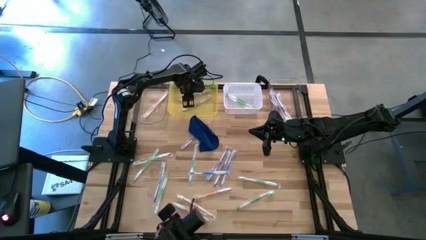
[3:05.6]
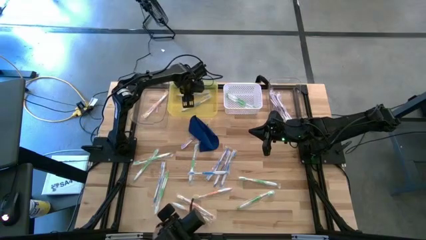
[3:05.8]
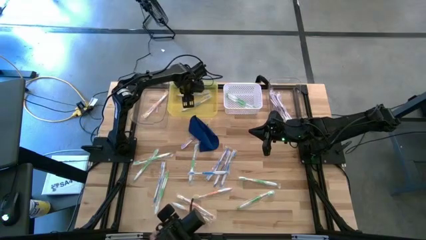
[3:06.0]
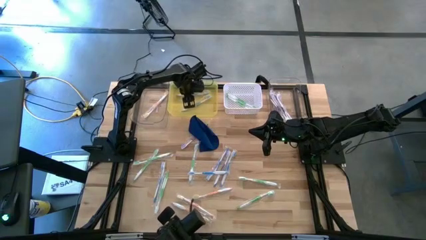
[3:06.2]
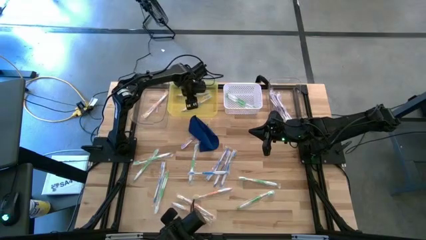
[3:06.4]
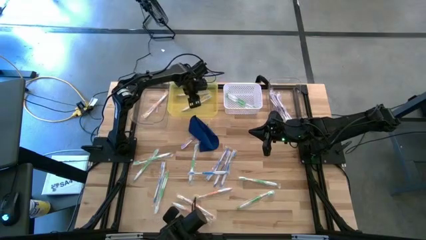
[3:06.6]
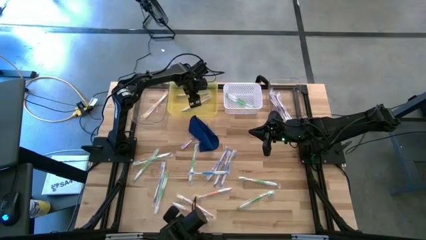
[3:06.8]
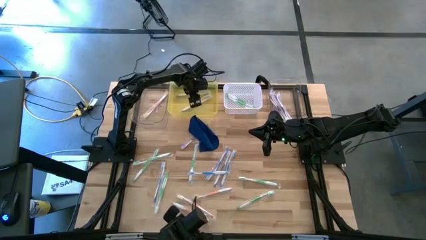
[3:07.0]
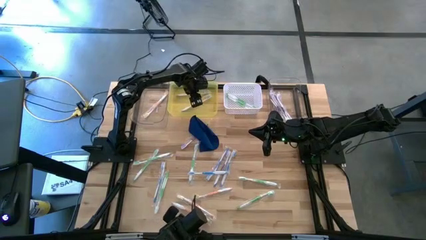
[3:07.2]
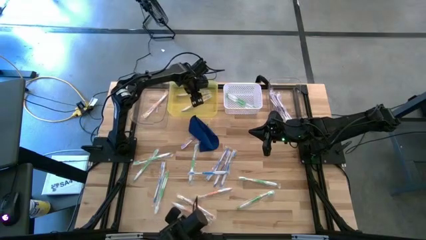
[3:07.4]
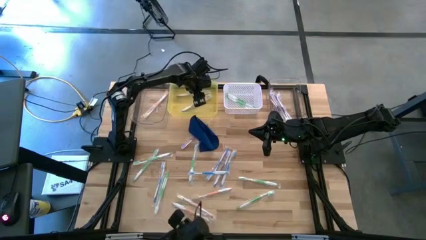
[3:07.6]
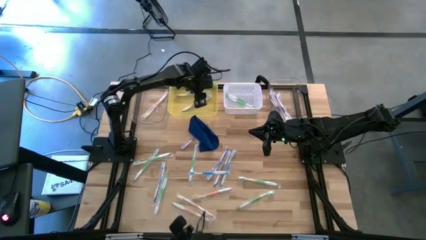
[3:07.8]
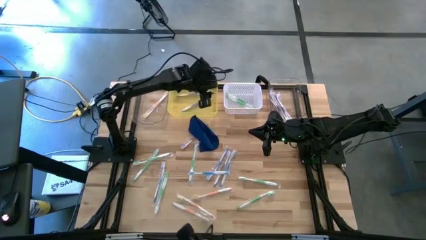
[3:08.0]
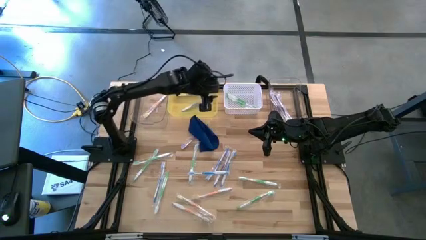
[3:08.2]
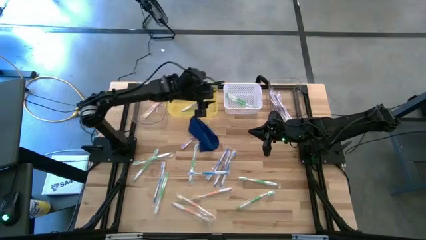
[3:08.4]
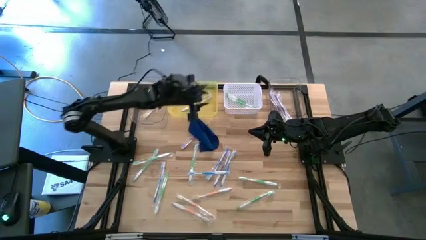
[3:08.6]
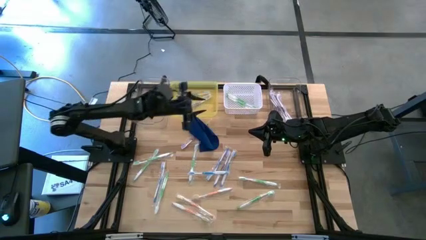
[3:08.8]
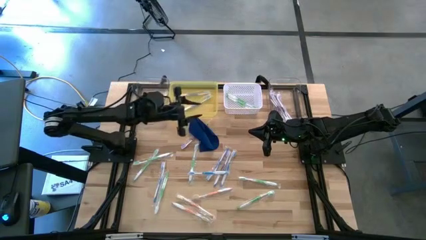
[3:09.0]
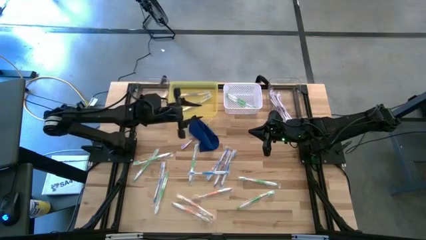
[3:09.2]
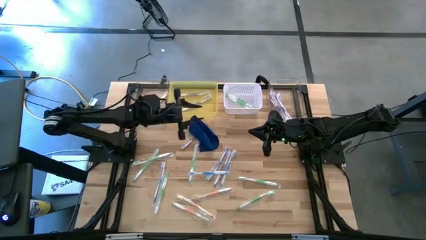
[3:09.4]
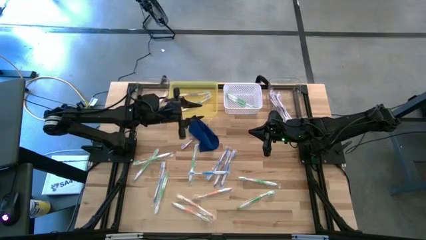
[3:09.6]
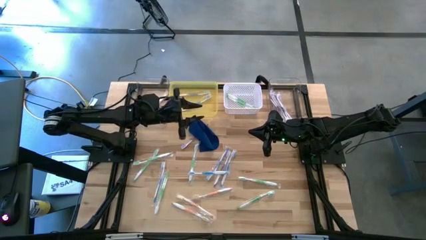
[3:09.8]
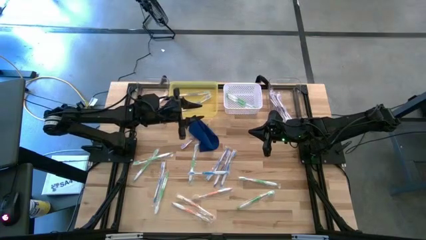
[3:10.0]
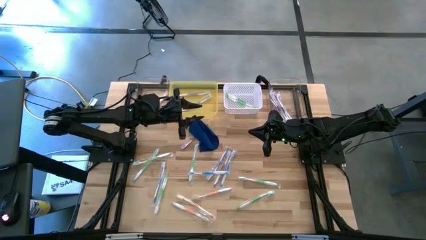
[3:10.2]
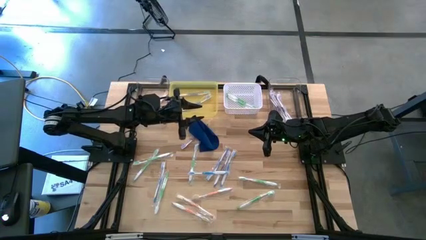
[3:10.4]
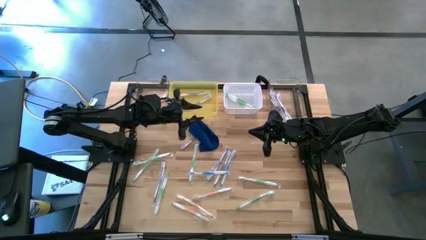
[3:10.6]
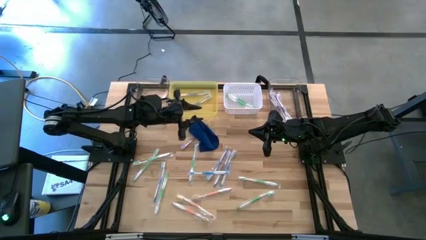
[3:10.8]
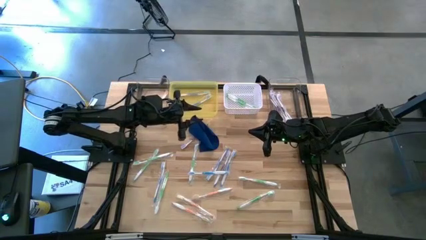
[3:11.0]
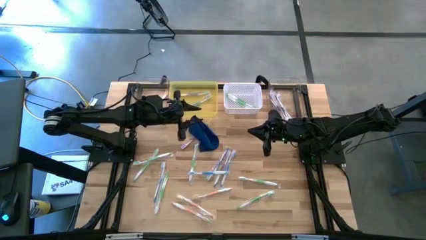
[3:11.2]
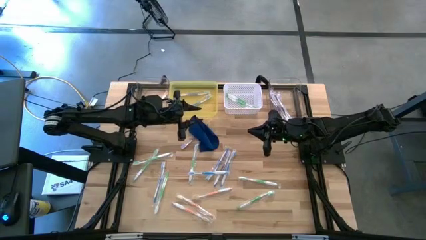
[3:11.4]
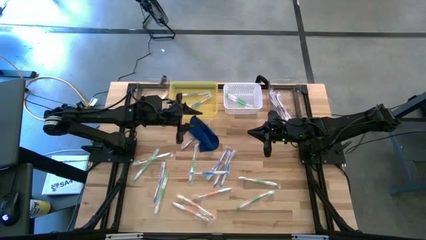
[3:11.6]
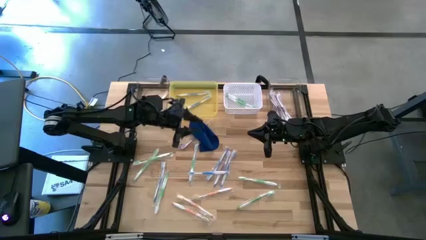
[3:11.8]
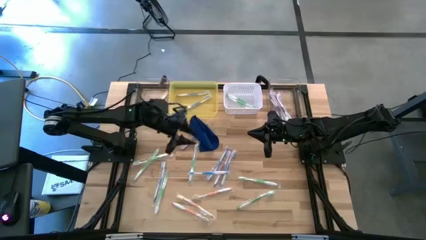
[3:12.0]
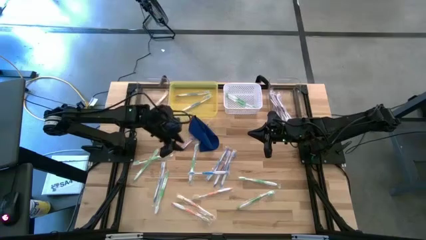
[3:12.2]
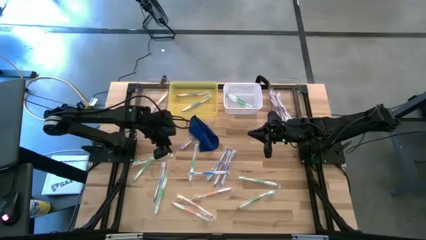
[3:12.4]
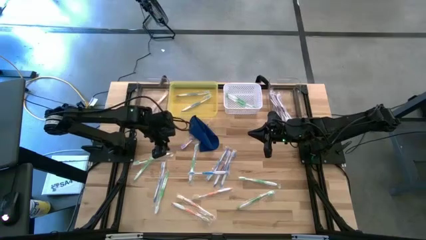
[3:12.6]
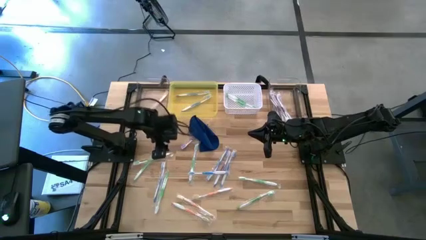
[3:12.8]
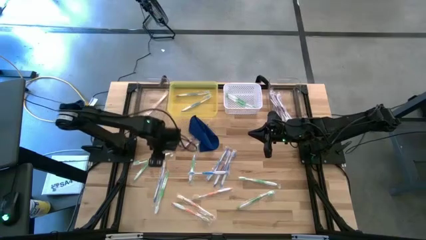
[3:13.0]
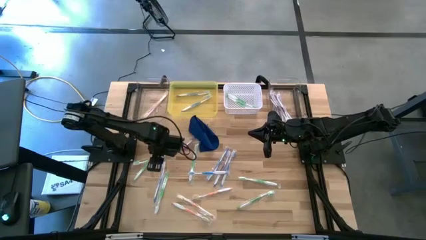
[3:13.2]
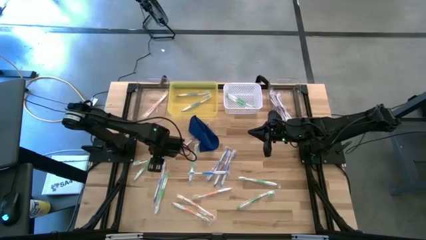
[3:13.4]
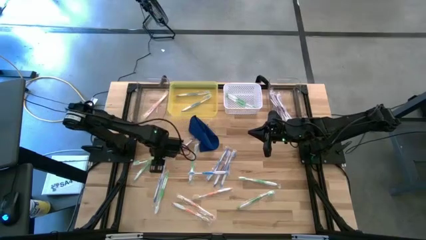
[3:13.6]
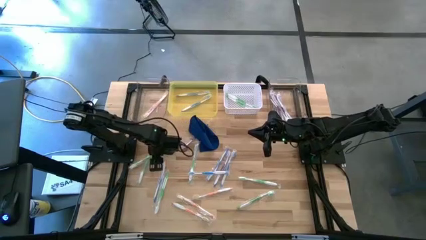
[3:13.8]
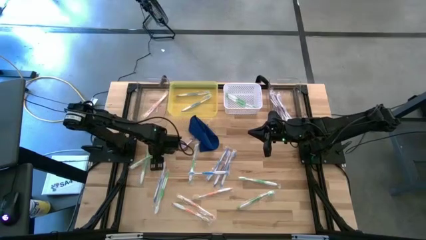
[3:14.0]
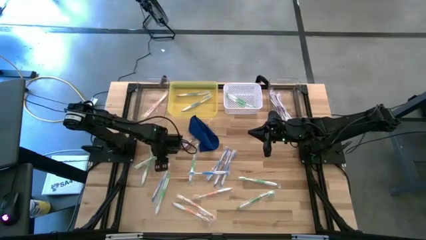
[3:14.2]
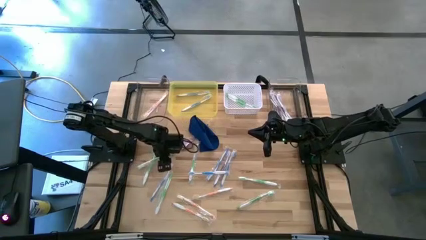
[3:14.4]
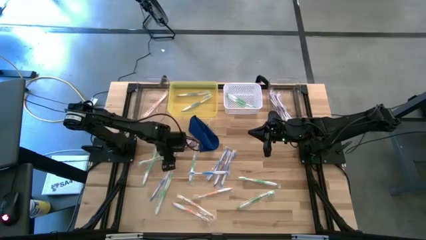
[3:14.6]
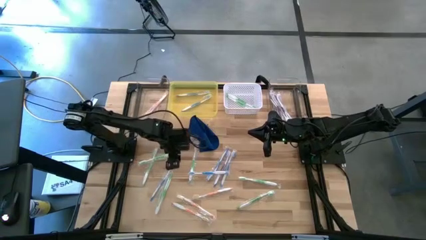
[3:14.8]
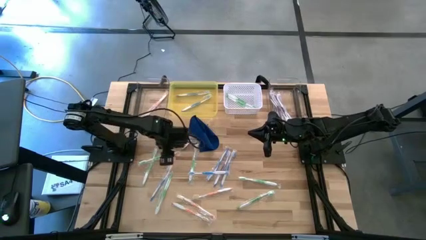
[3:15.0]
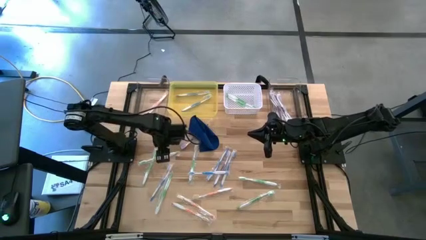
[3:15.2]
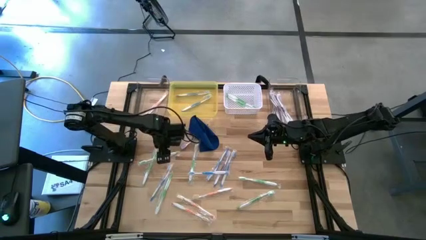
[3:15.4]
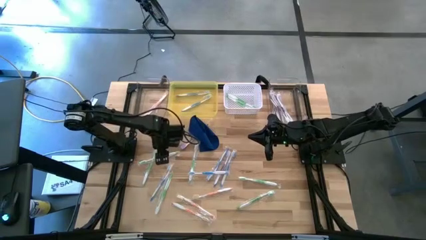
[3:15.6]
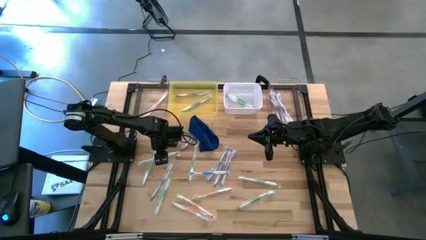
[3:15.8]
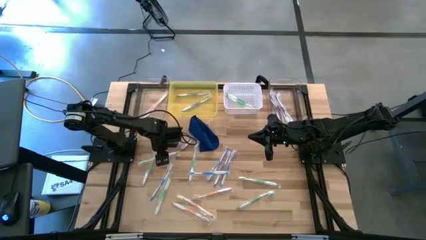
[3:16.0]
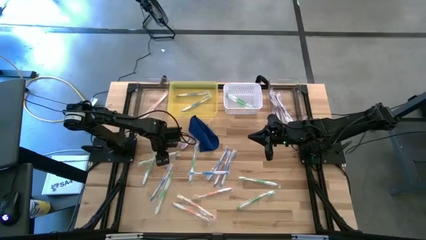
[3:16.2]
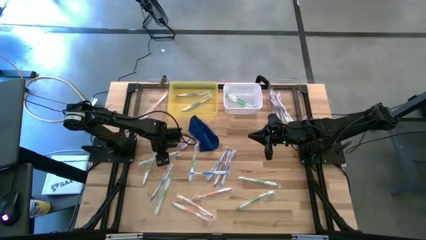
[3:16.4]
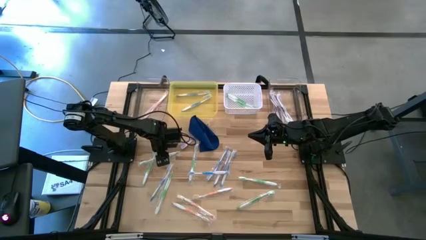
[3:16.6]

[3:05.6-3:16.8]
Task: Pick & Place Toothbrushes
Put the green toothbrush into the white bin

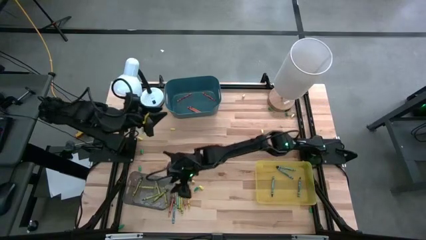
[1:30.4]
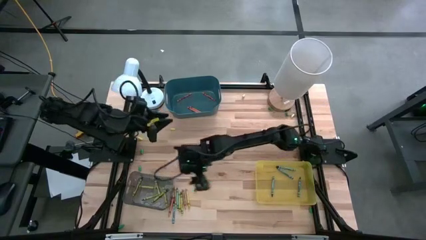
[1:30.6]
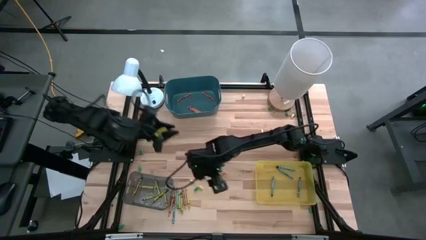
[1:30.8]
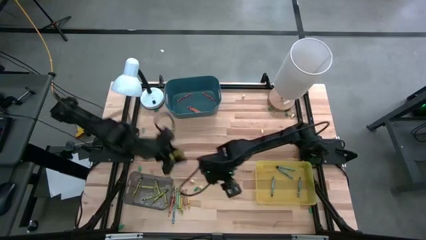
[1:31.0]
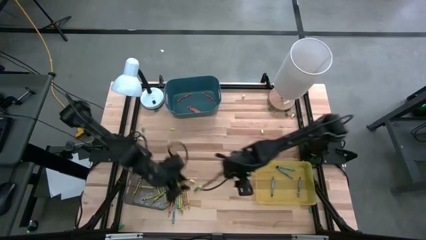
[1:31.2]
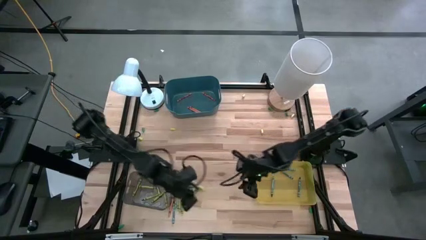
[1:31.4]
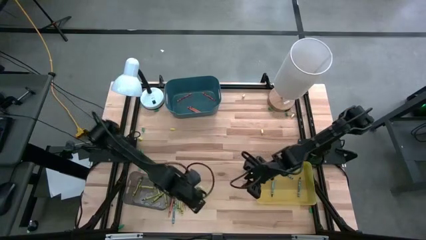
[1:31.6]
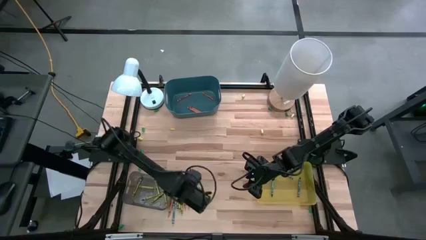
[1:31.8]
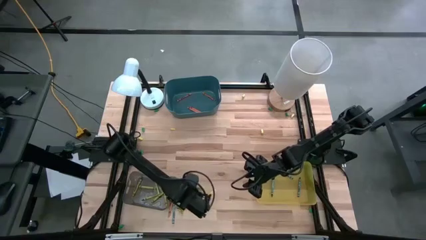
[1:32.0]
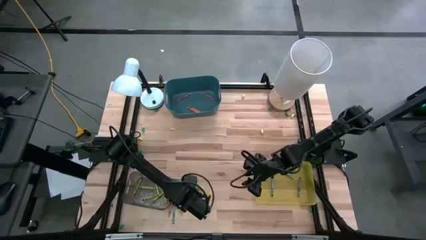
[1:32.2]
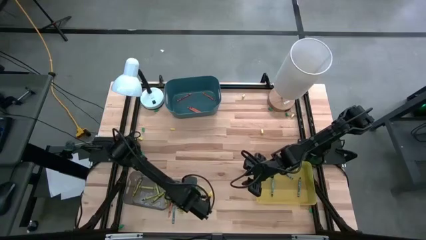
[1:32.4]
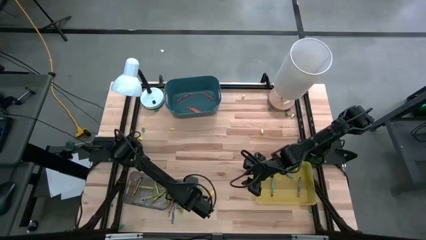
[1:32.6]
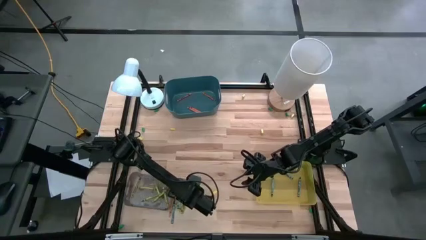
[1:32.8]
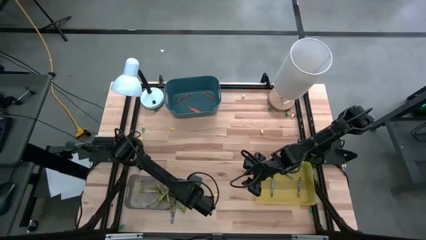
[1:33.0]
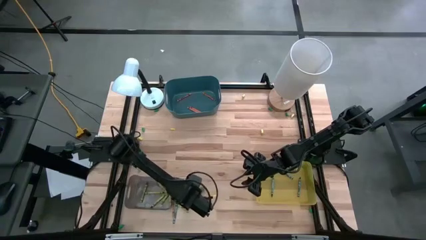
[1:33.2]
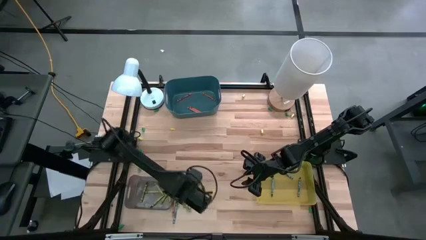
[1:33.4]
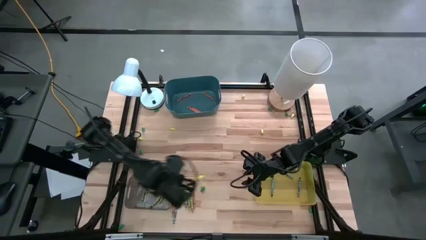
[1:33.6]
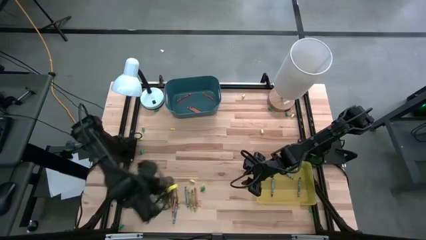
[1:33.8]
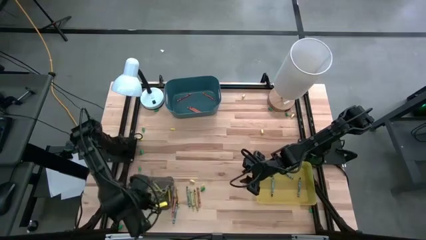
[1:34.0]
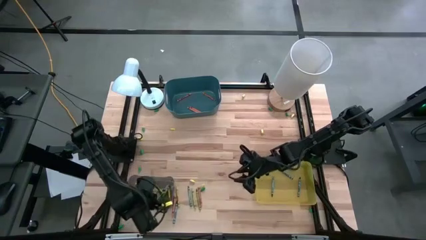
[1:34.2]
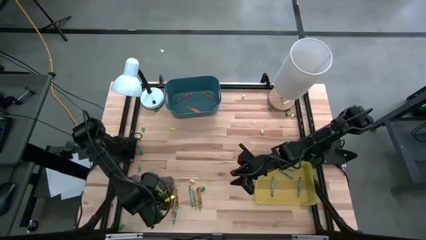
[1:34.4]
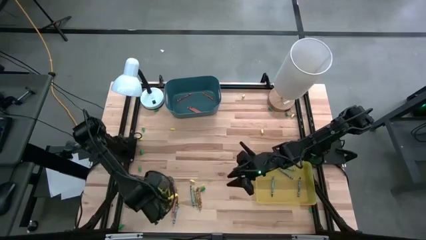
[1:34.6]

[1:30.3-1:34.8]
Task: Sort crayons
Put the yellow crayon into the gray bin
